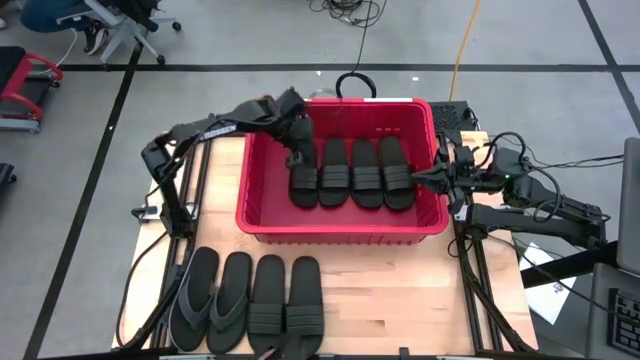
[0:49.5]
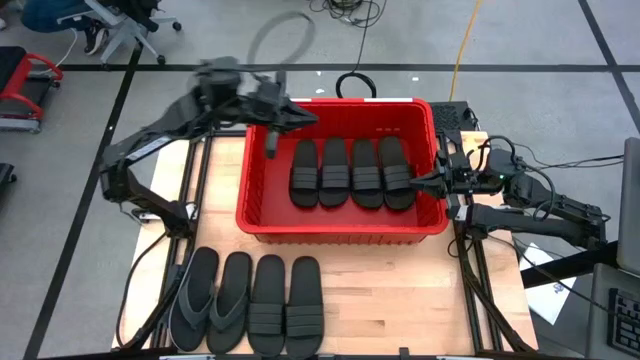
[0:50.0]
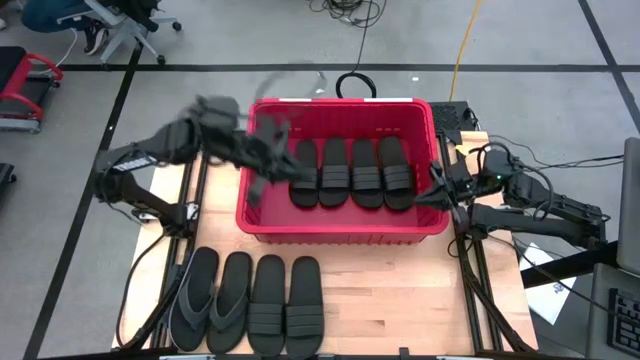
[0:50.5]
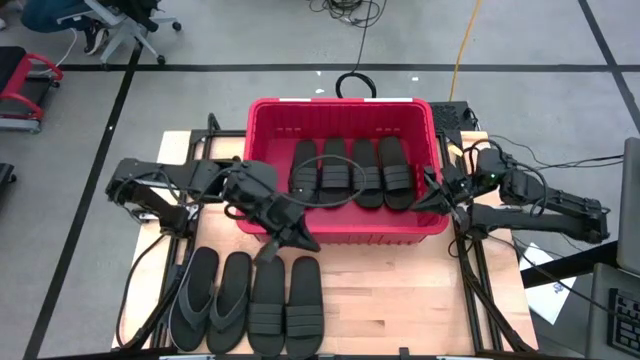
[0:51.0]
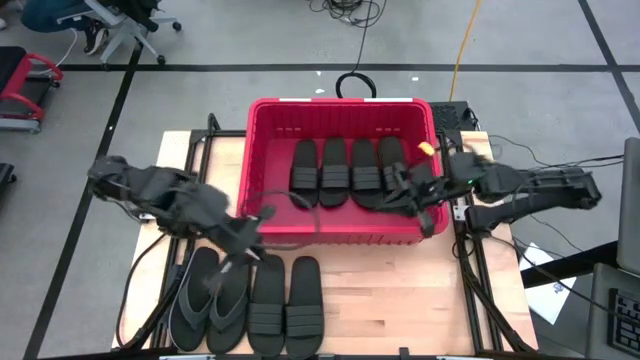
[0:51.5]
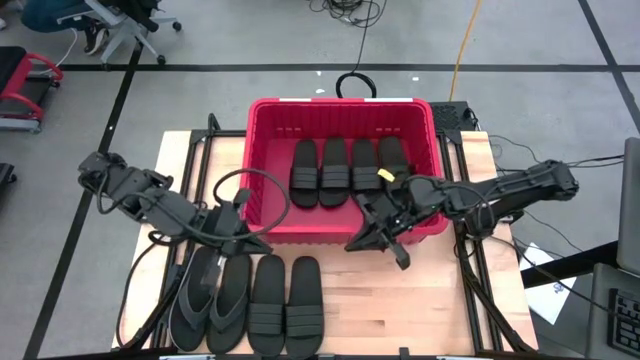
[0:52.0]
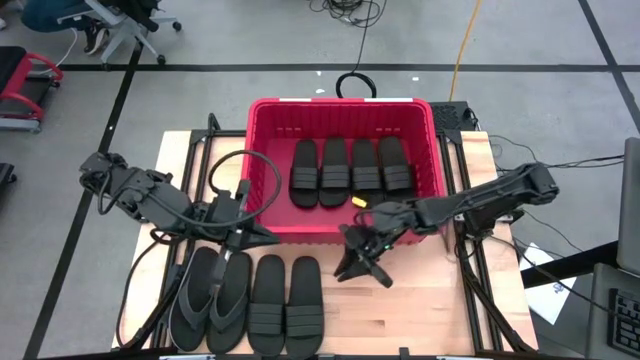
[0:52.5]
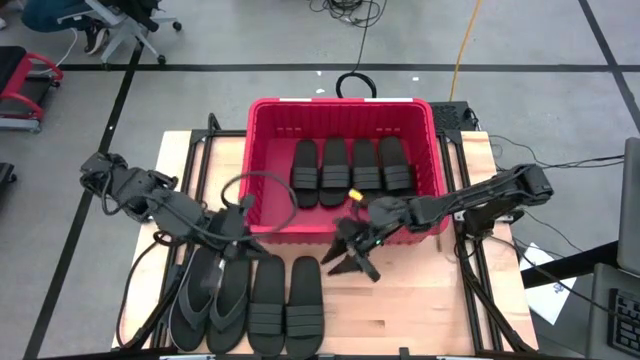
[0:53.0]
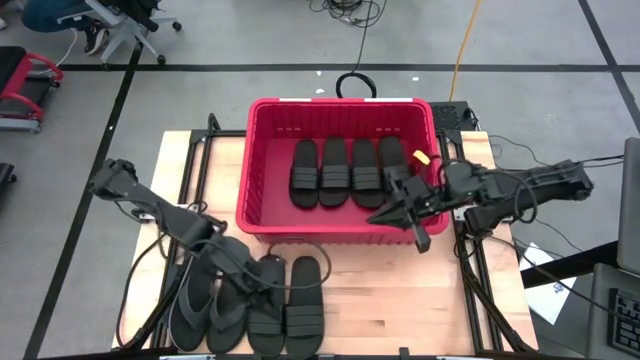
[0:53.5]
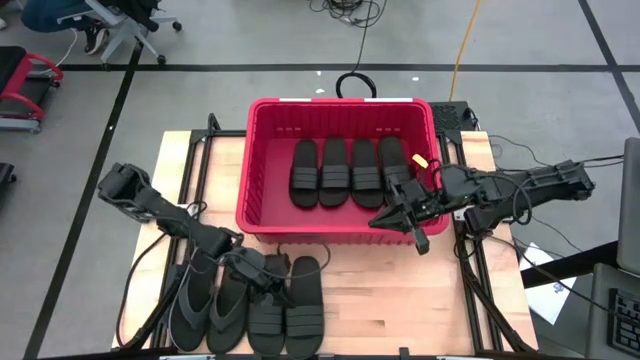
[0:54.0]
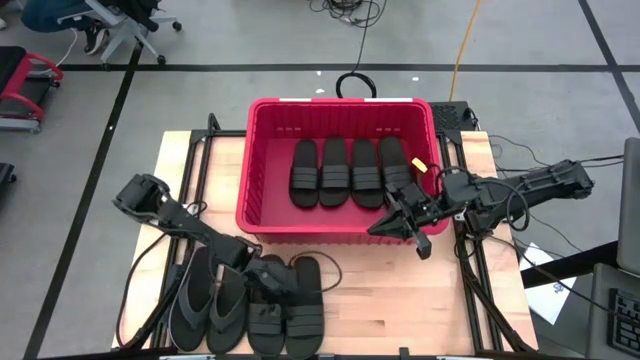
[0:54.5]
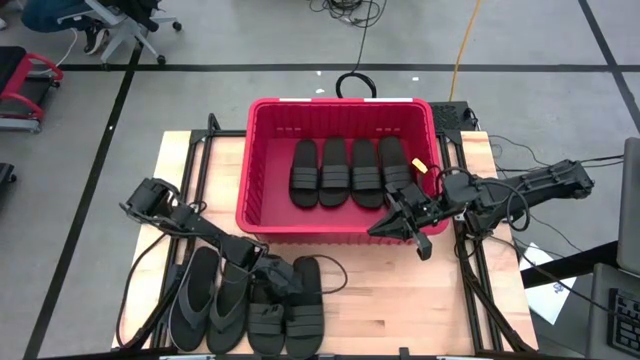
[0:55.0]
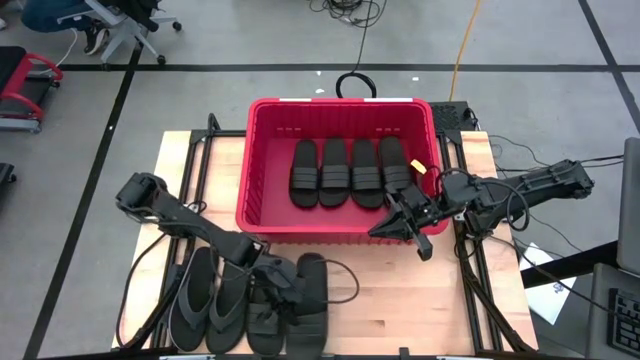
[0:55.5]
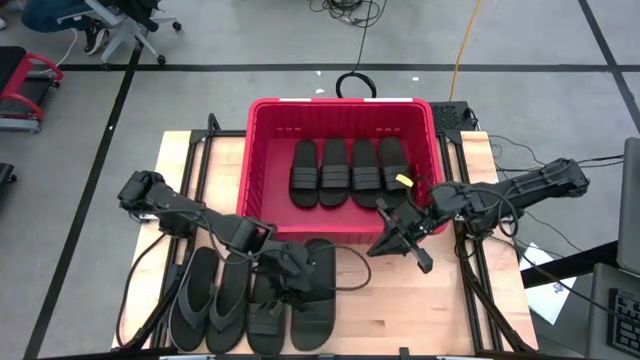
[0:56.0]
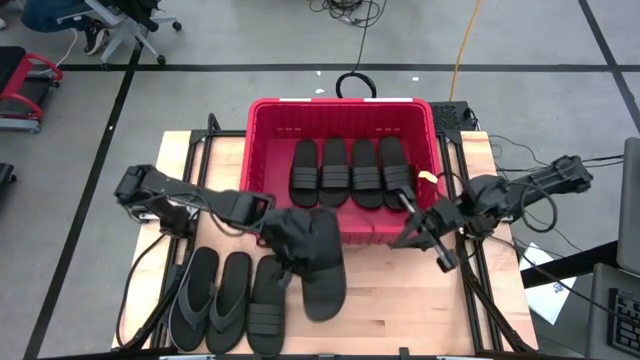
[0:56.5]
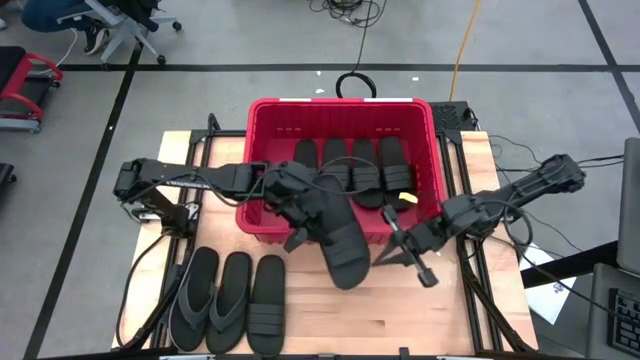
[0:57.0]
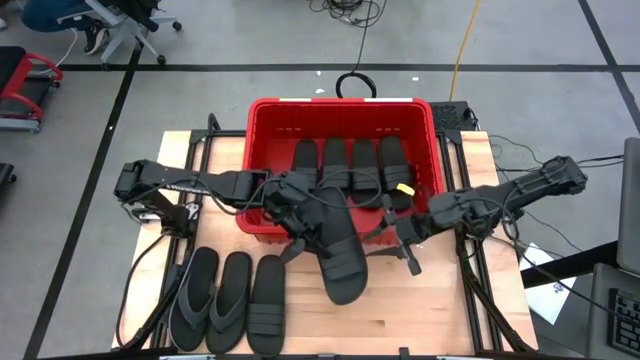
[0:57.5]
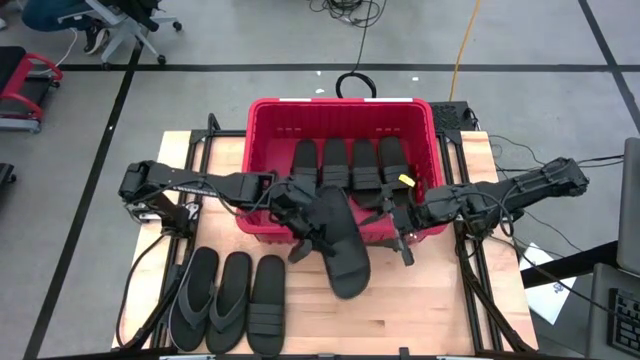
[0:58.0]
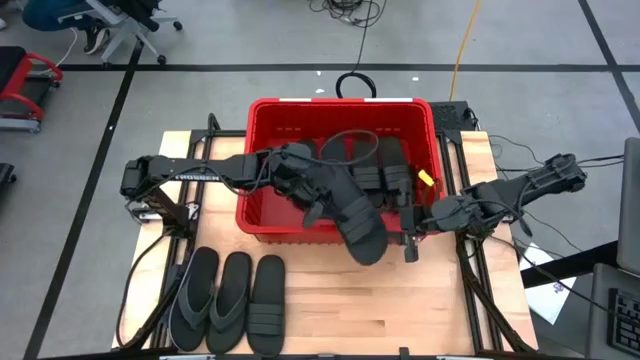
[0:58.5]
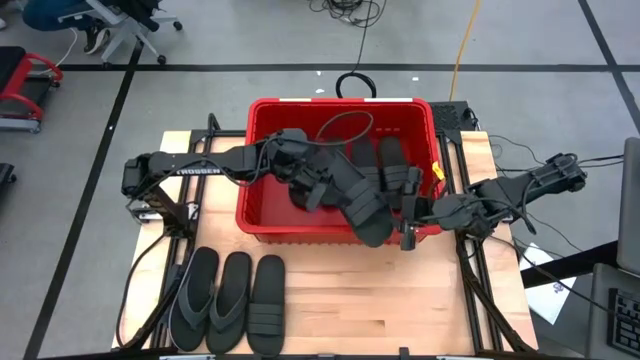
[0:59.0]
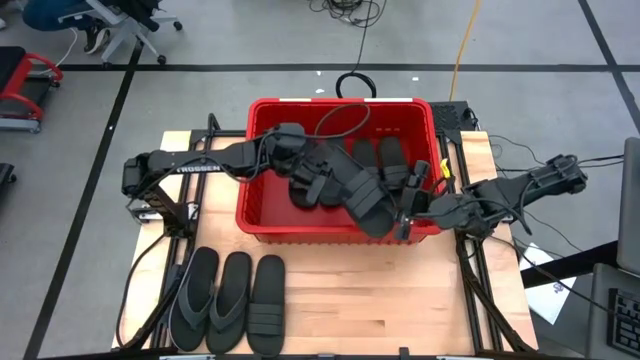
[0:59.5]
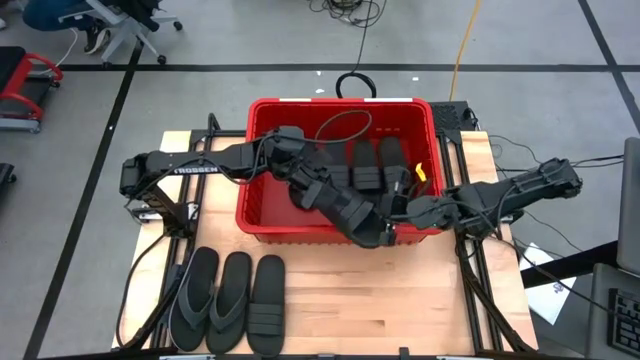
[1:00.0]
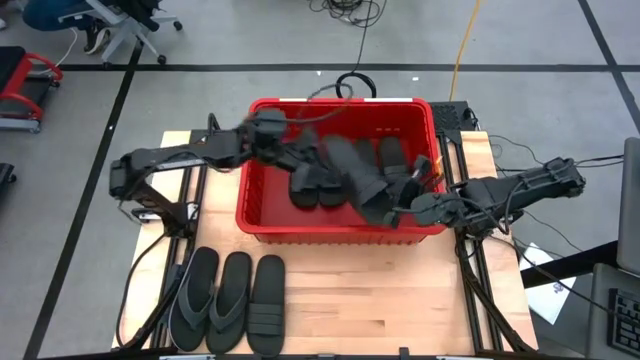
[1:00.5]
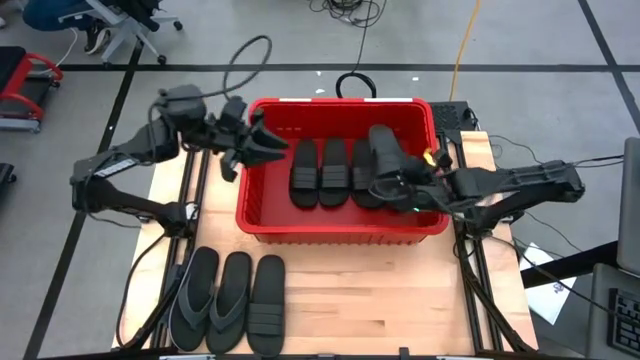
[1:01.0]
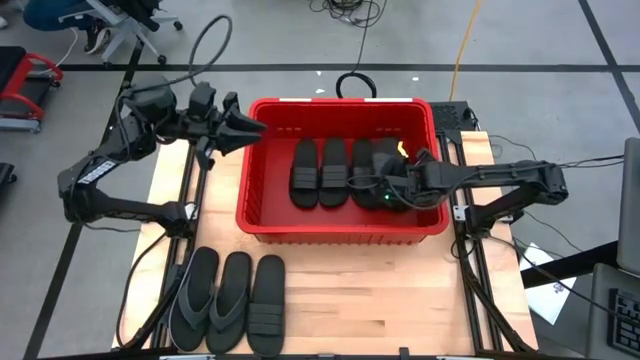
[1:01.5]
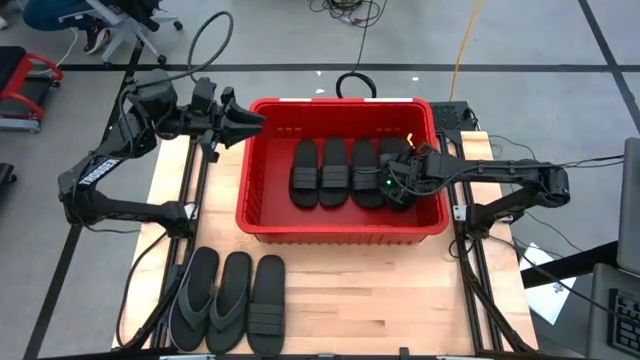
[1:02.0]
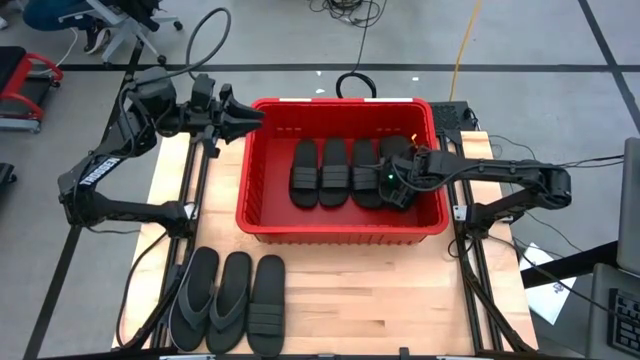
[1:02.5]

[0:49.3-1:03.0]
Task: Pick and place slides into bin
Put the black slipper into the red bin

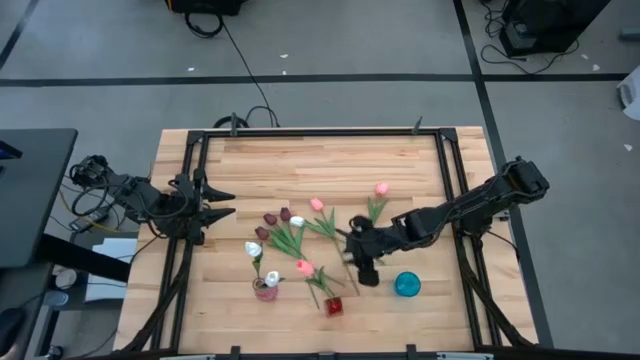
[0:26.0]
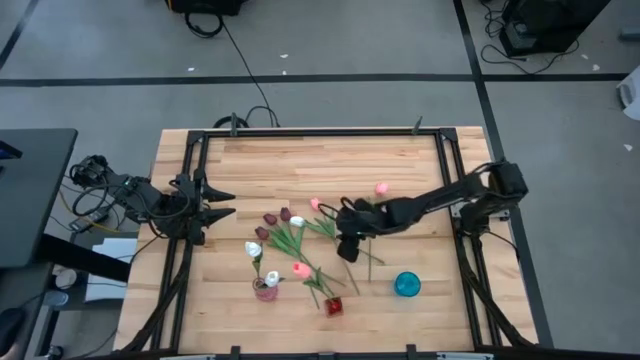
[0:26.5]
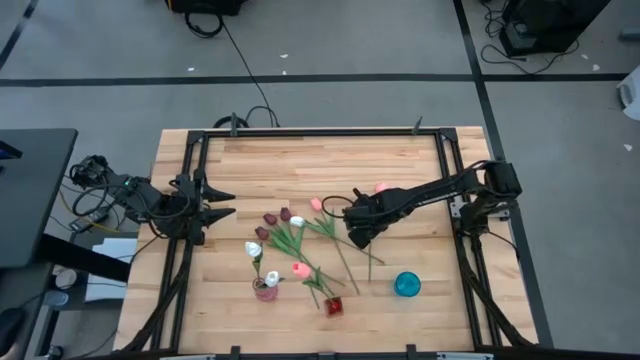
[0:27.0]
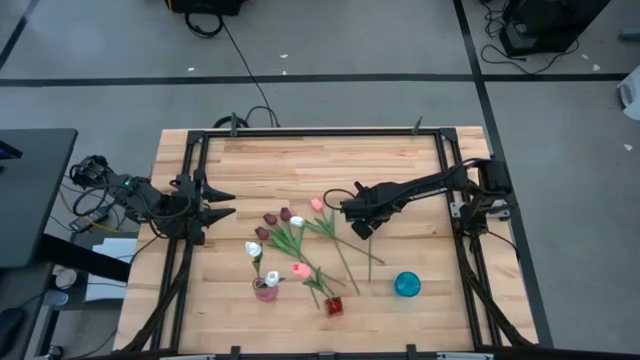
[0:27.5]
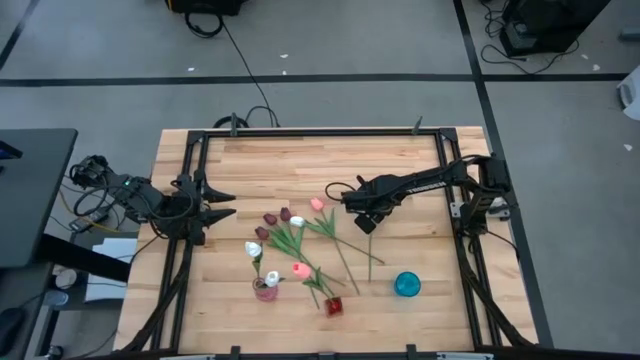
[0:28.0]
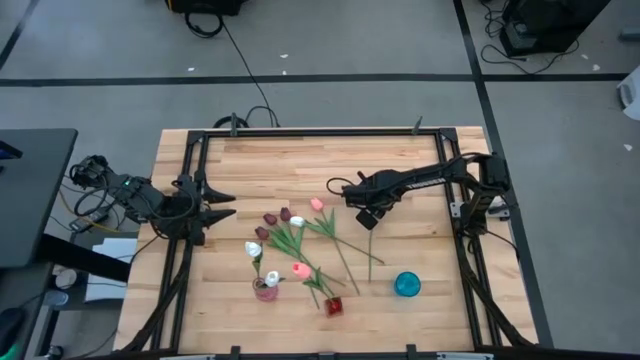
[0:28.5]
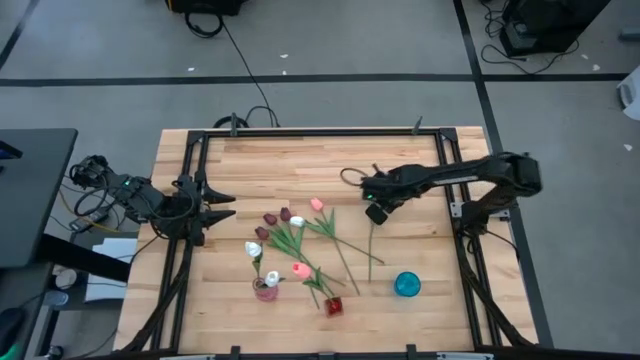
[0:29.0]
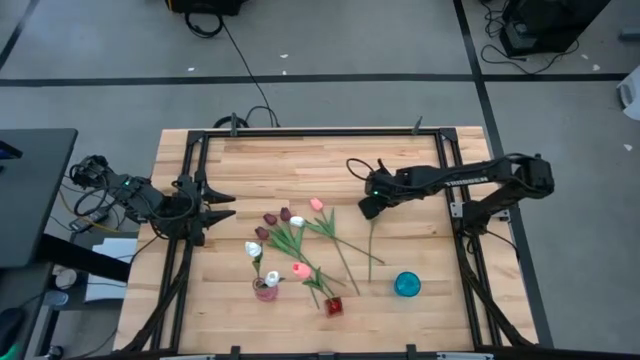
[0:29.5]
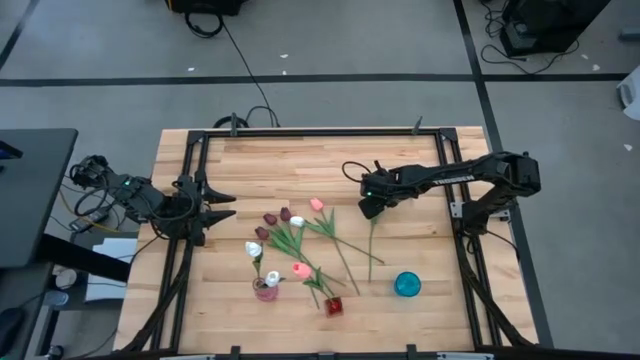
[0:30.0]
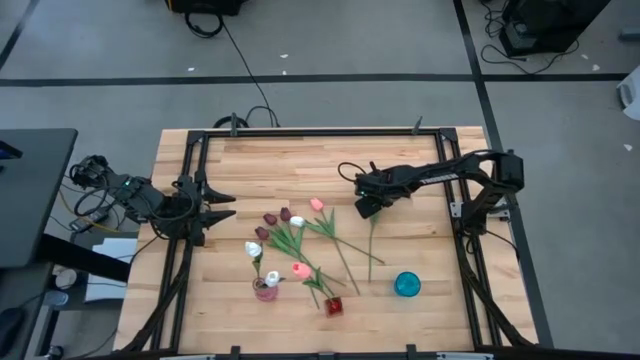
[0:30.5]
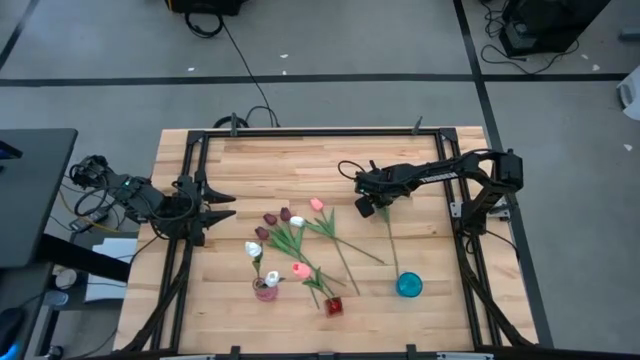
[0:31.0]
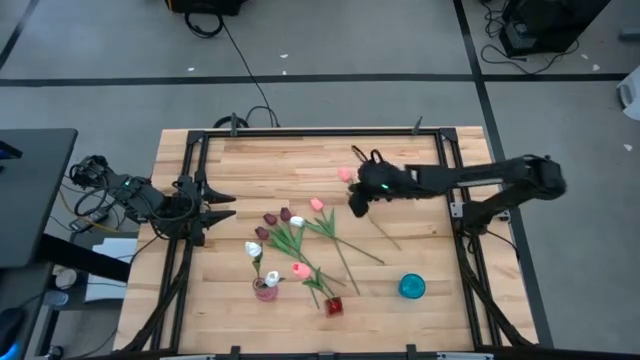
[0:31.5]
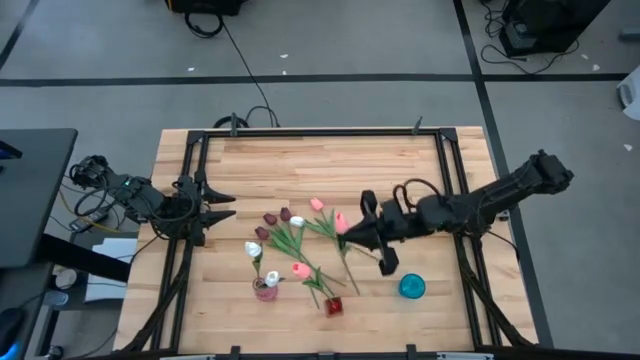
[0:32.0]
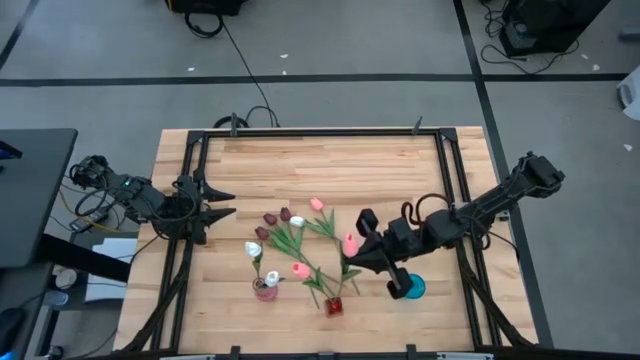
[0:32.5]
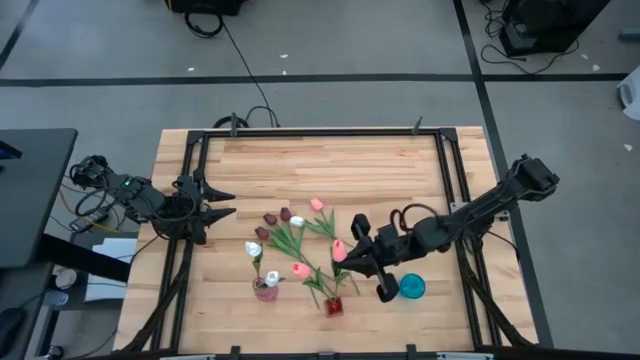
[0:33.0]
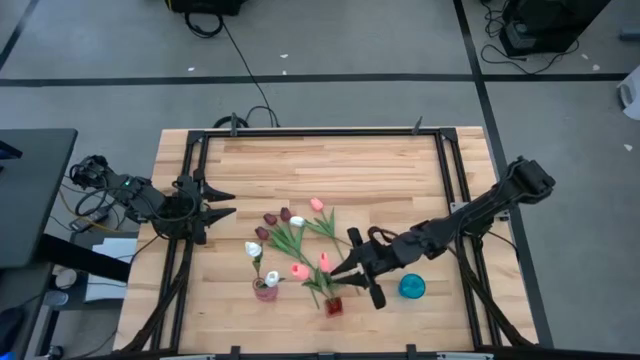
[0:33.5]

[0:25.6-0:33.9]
Task: Sort flowers into vase by color
Put the right pink flower into the red vase
